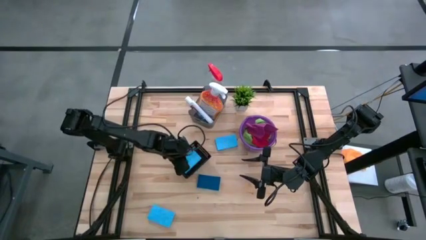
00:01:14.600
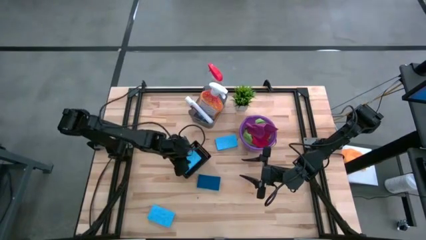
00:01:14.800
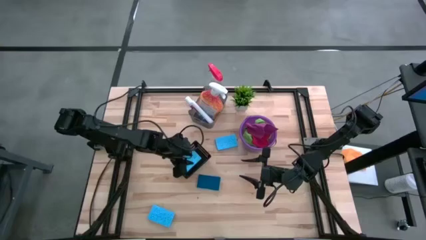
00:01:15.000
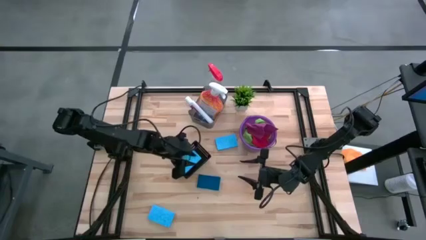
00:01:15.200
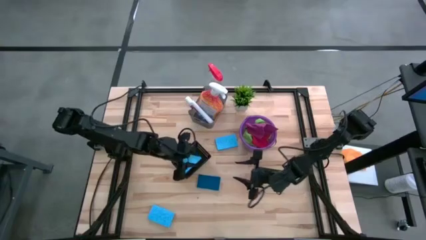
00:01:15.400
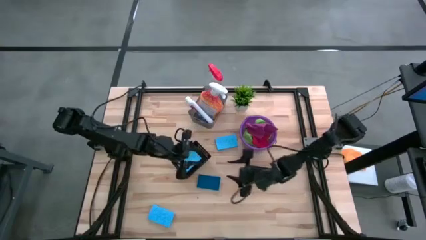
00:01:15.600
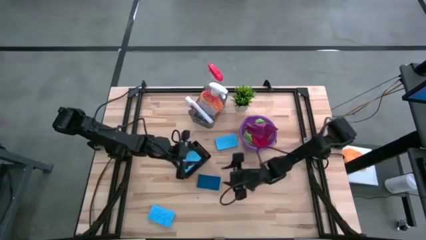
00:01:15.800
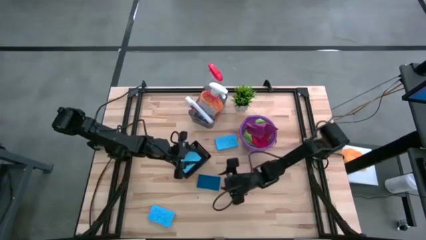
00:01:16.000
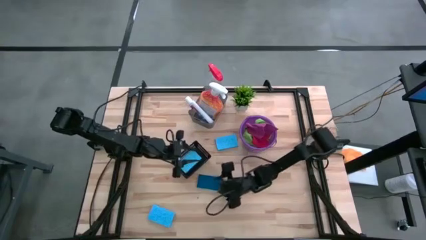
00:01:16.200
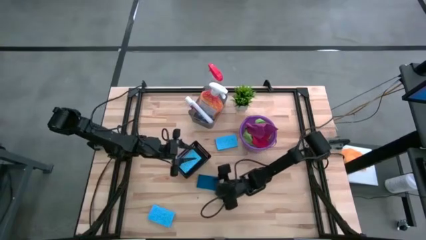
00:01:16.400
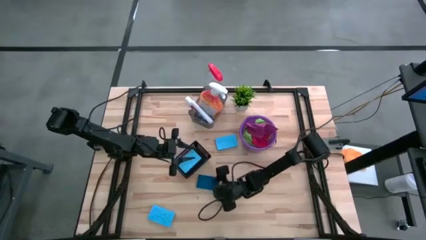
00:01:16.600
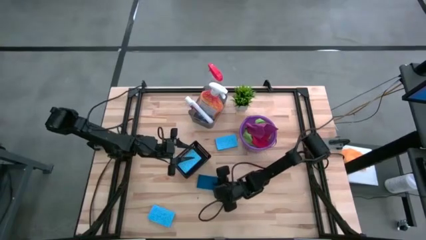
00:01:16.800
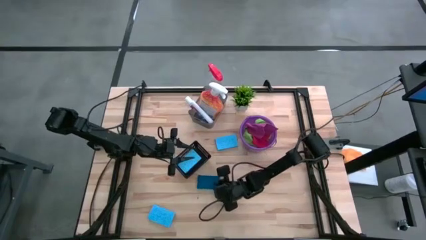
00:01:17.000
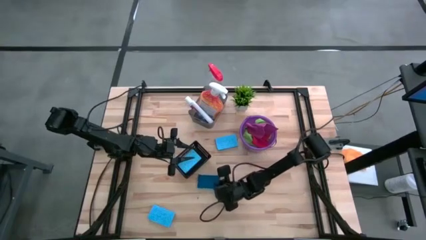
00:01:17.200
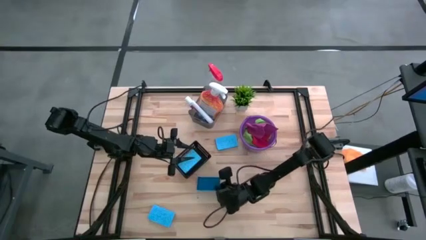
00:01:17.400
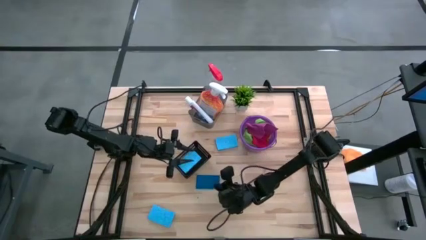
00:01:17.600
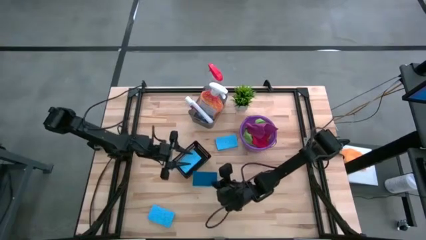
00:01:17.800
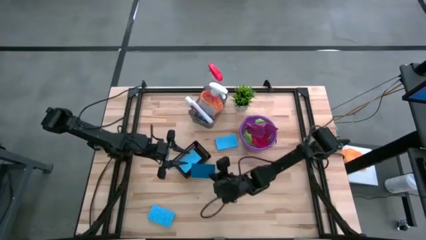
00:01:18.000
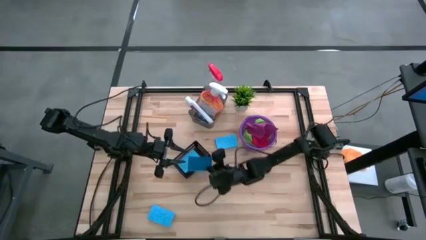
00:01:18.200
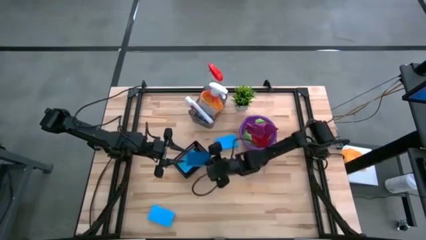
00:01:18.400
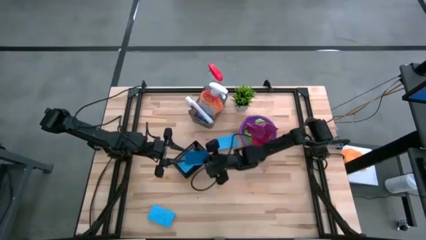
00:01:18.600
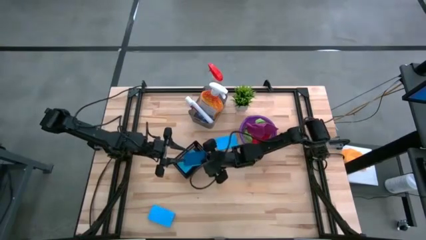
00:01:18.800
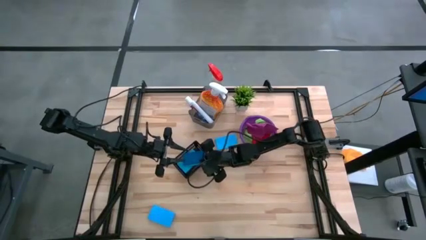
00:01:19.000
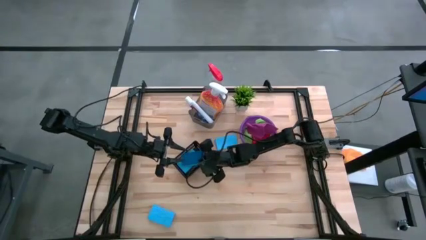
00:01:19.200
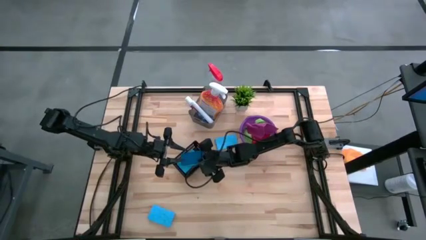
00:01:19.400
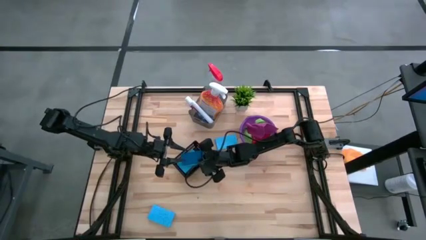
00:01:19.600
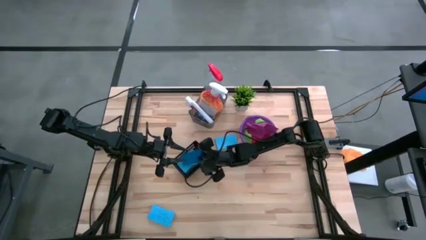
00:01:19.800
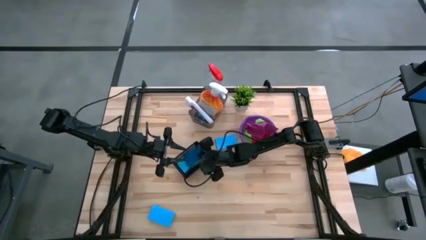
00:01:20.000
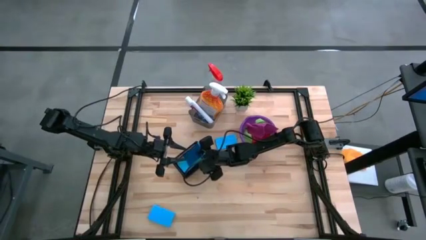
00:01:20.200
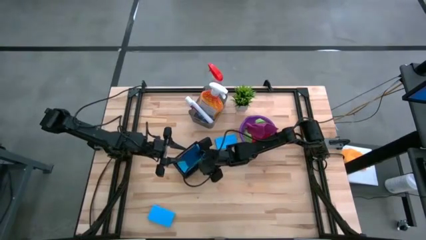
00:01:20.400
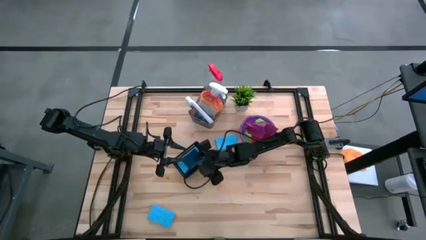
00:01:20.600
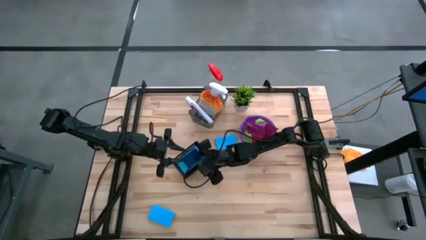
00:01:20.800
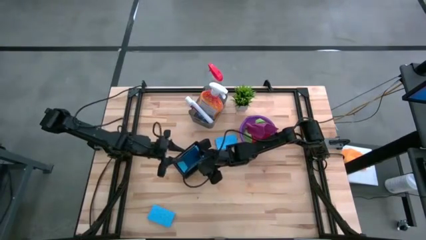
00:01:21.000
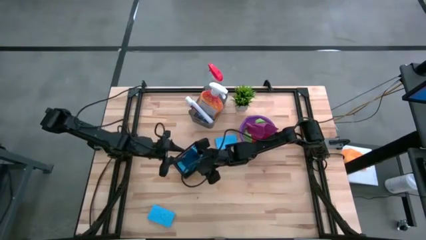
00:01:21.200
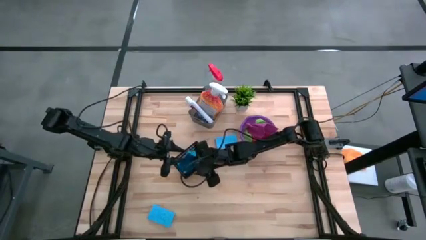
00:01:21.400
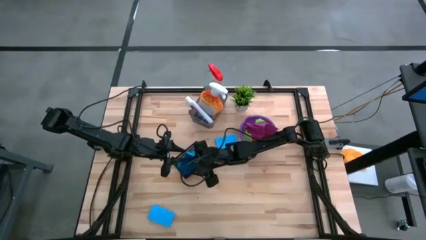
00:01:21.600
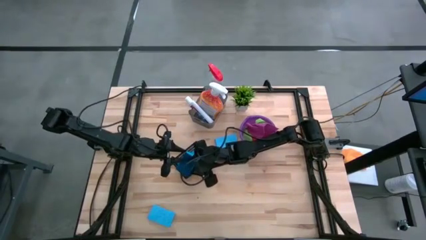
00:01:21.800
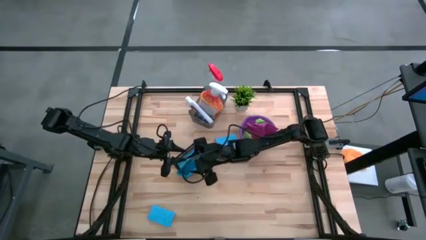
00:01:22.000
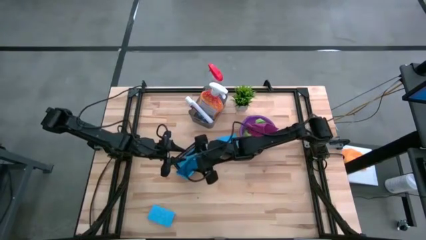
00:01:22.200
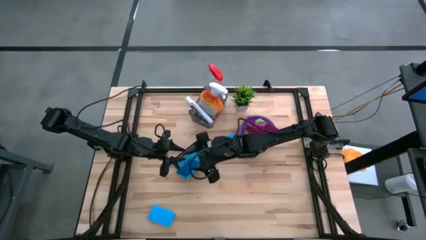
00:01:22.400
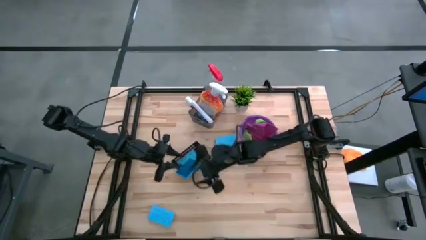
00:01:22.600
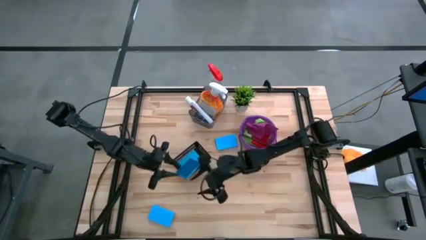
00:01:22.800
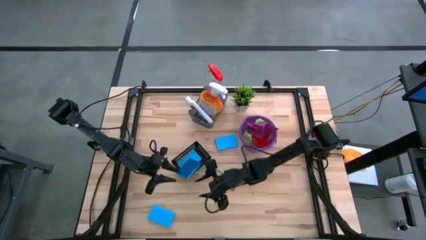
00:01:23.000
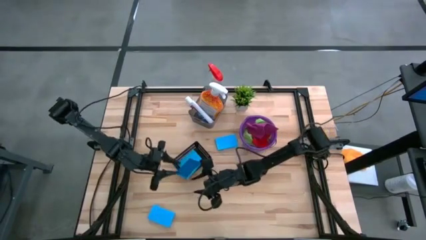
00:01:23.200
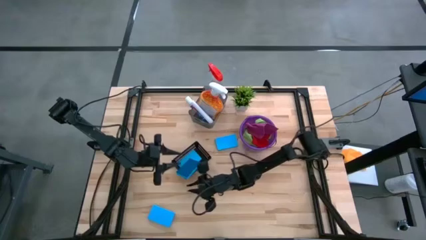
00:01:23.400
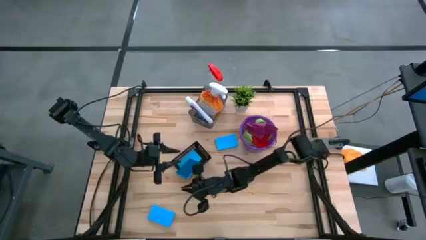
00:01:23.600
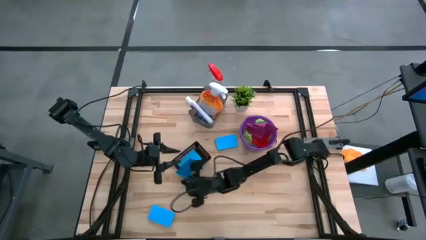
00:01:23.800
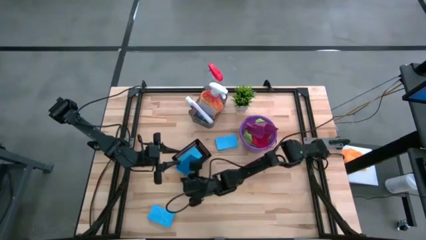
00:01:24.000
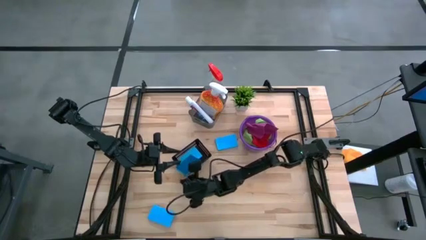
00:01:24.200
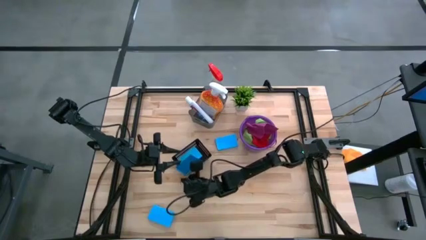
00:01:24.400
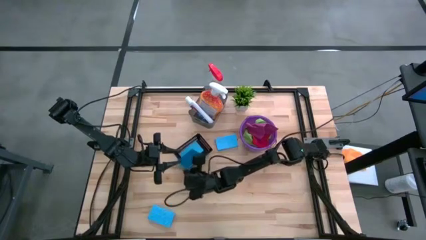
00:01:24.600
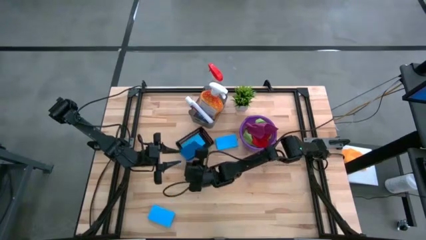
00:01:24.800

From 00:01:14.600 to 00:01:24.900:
Task: Pick & Place Kitchen Items
Put the blue sponge into the black basket

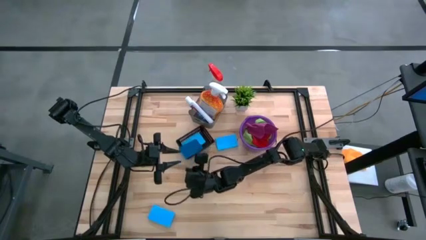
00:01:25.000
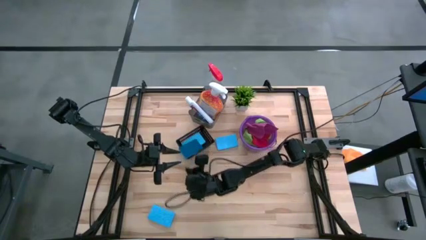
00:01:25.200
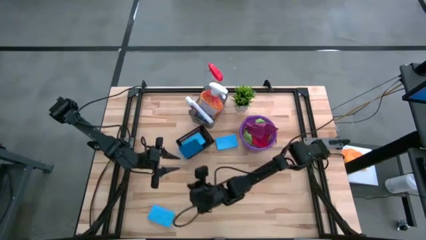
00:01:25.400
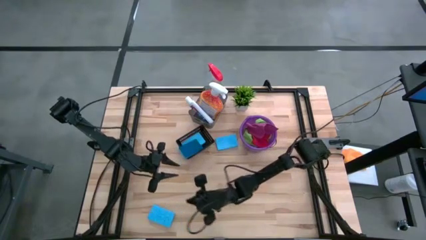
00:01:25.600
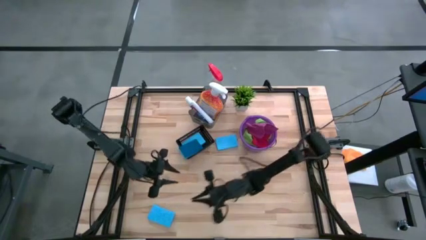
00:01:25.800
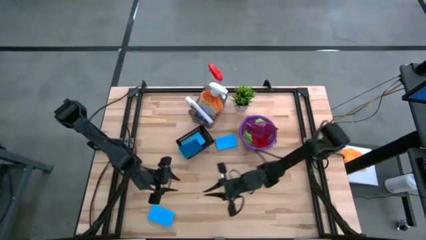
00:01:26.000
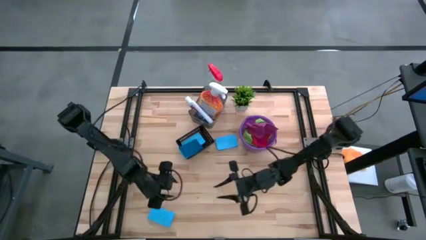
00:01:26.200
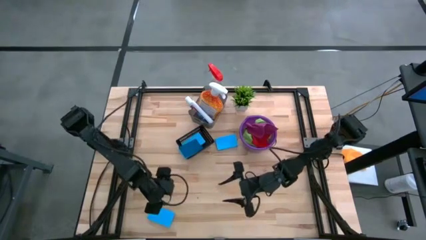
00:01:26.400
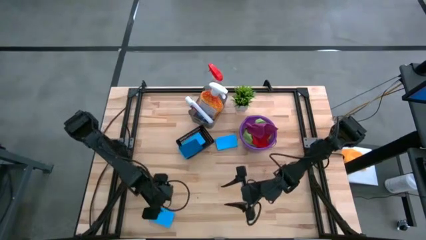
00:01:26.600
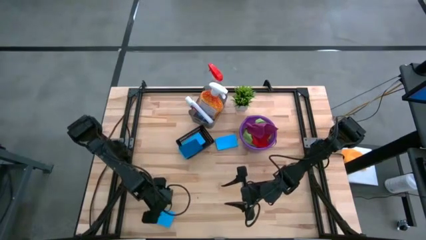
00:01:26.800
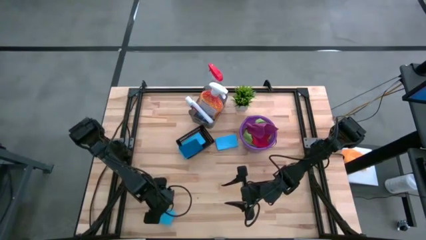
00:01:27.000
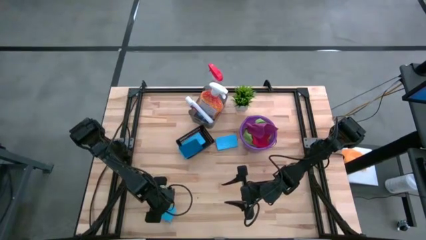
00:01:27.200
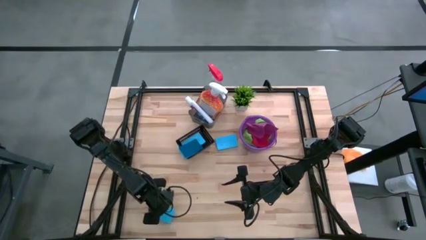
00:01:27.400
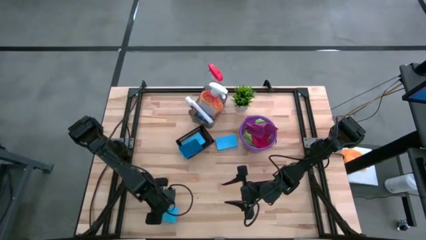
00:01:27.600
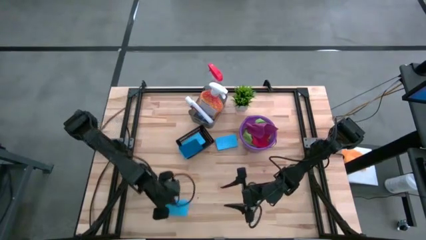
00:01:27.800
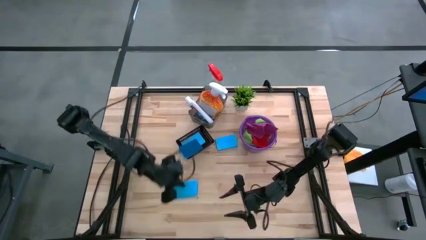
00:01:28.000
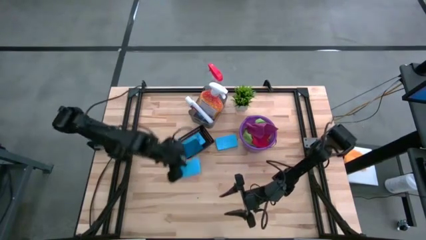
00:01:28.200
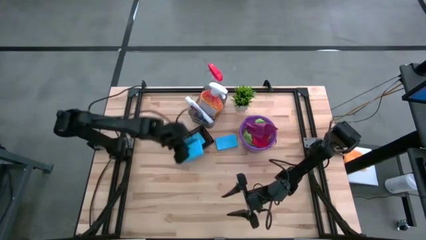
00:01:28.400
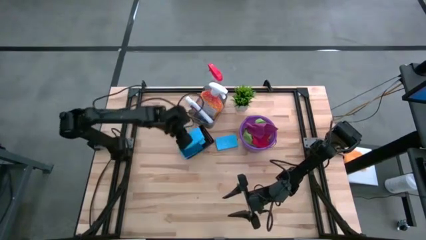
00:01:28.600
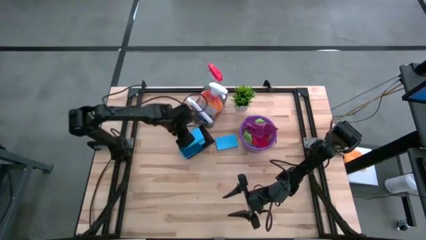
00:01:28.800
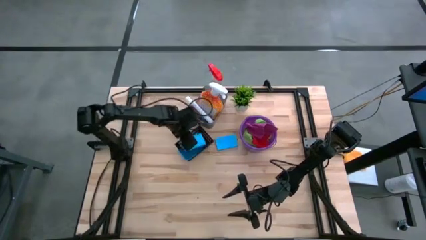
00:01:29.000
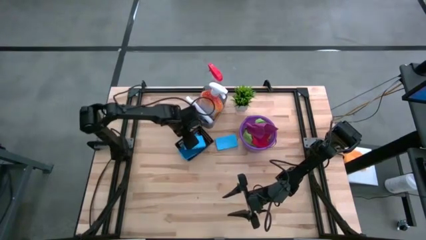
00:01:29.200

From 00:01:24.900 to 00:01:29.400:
Put the blue sponge into the black basket
